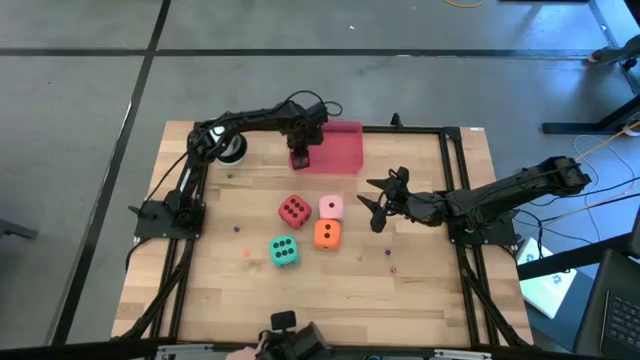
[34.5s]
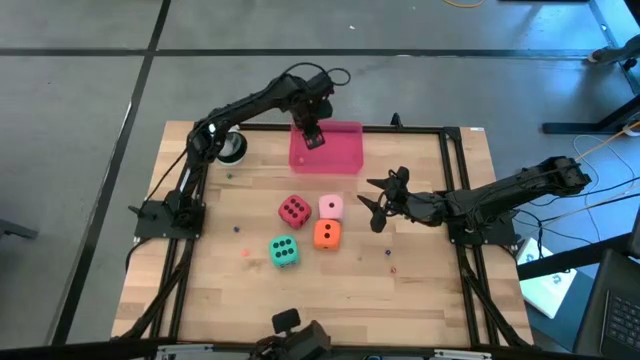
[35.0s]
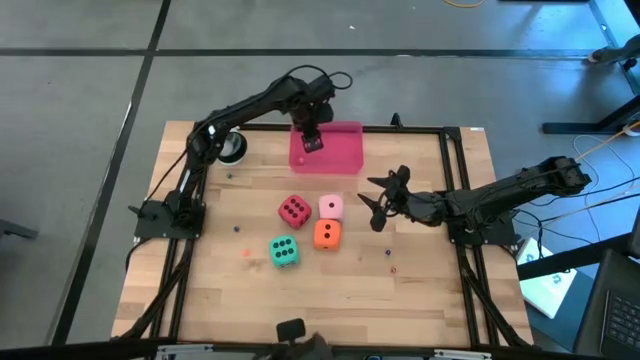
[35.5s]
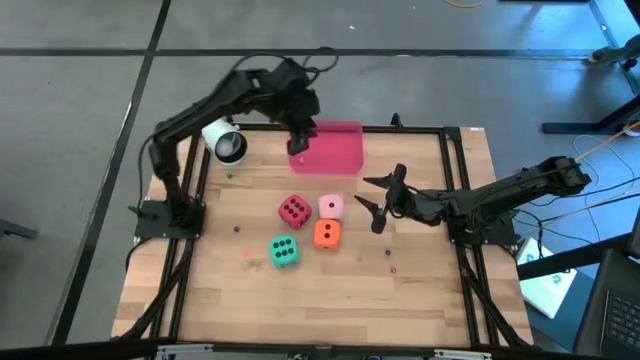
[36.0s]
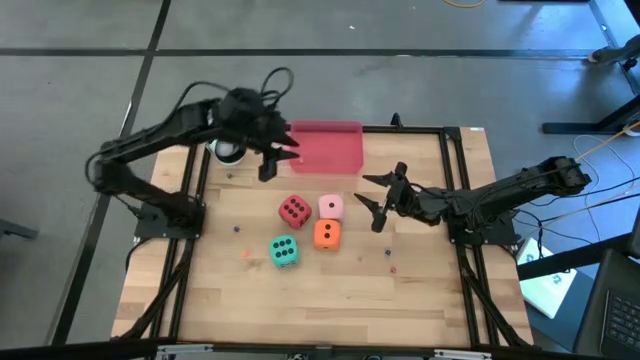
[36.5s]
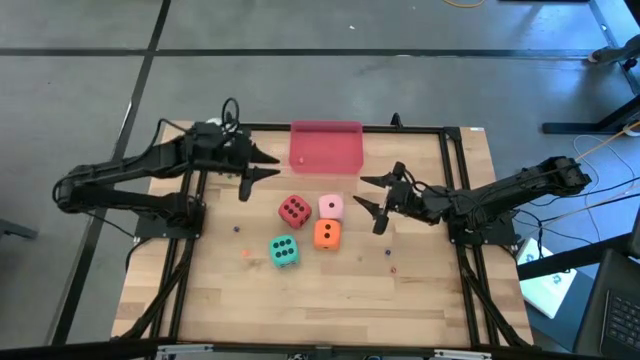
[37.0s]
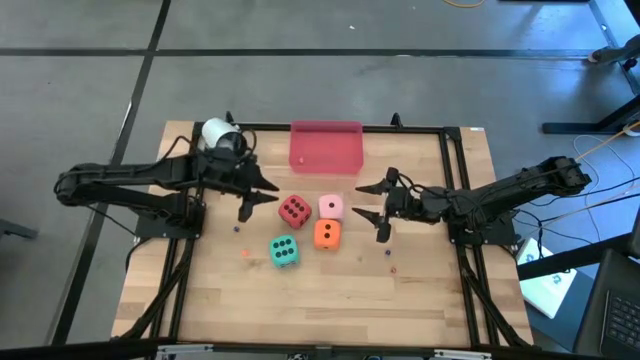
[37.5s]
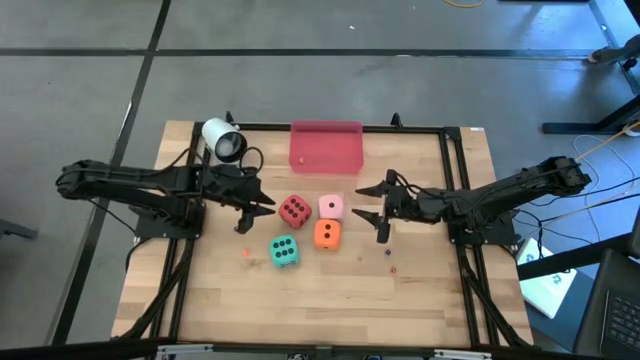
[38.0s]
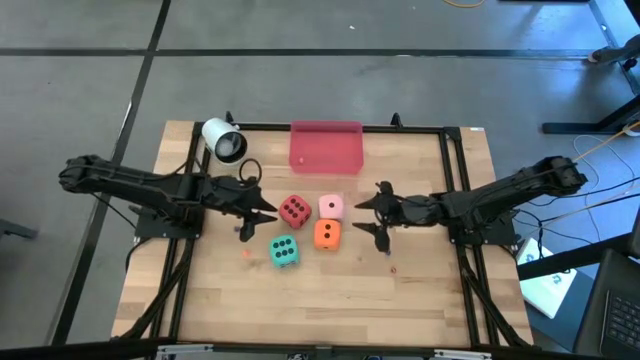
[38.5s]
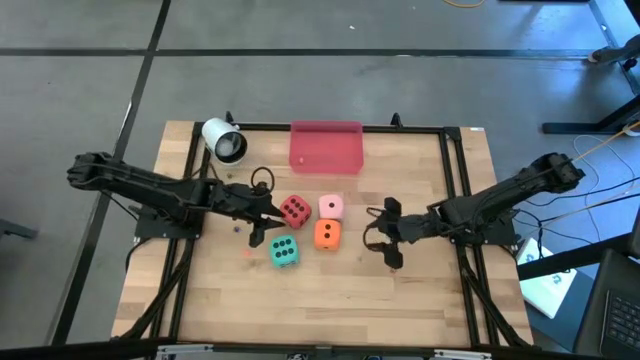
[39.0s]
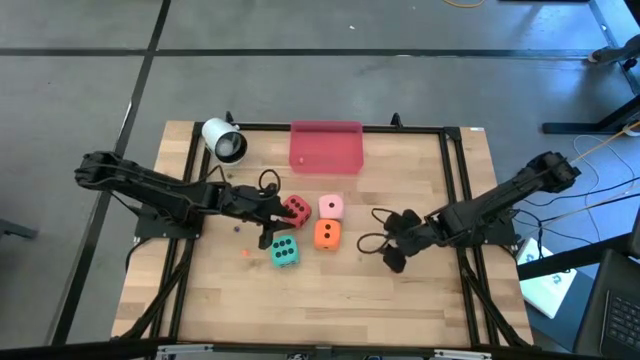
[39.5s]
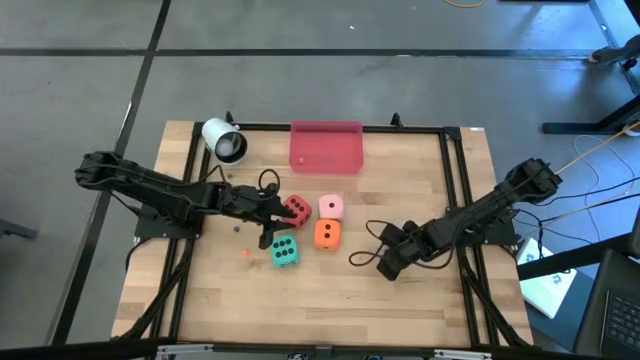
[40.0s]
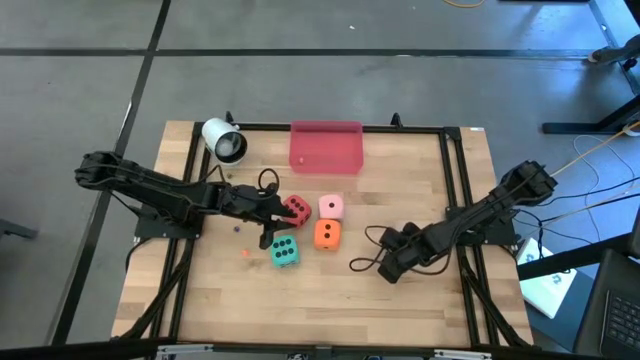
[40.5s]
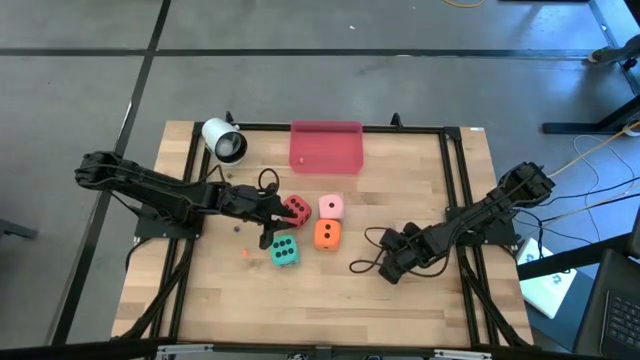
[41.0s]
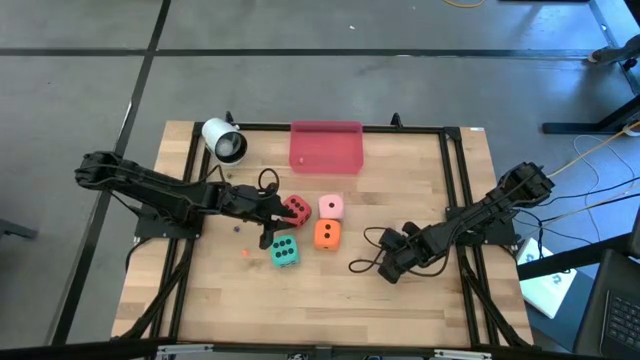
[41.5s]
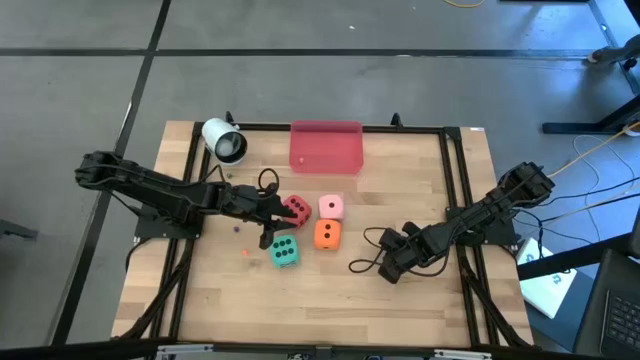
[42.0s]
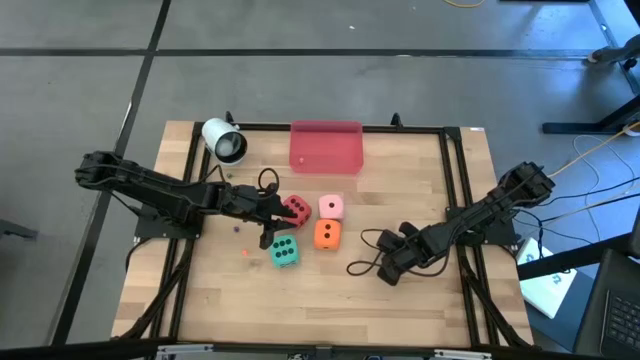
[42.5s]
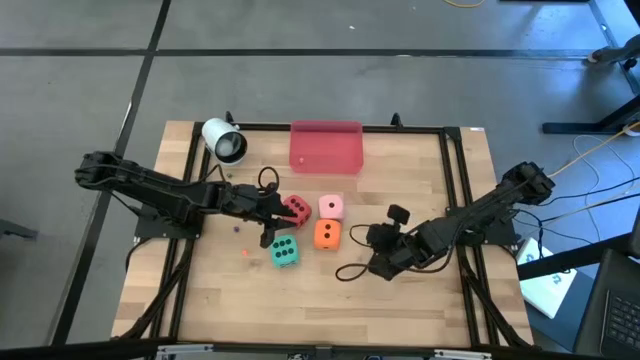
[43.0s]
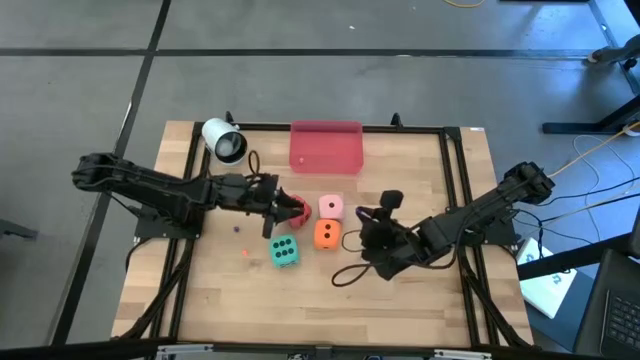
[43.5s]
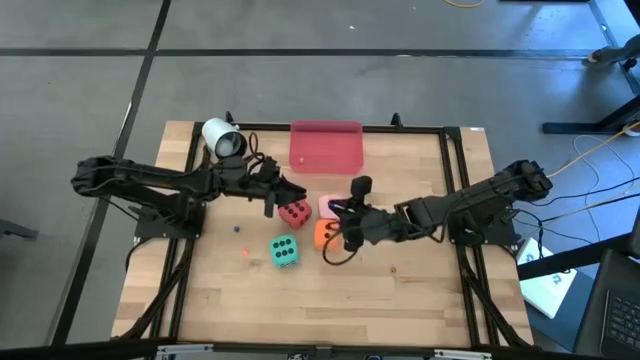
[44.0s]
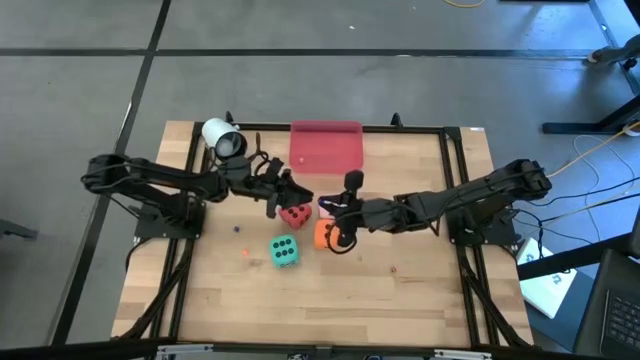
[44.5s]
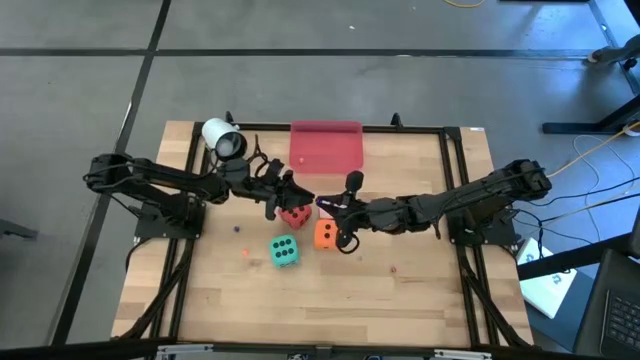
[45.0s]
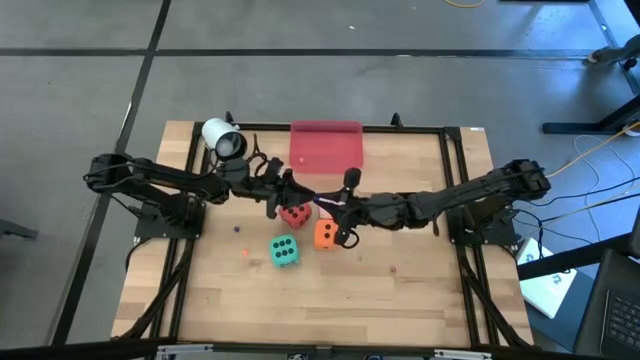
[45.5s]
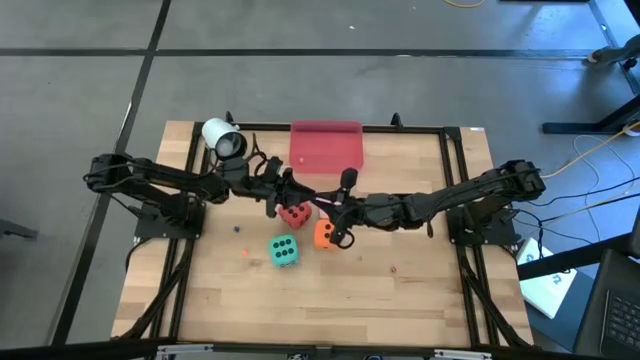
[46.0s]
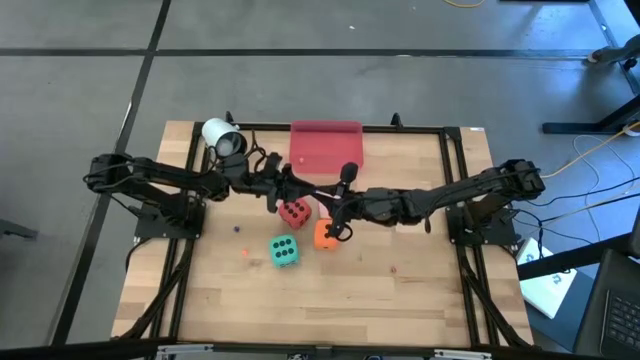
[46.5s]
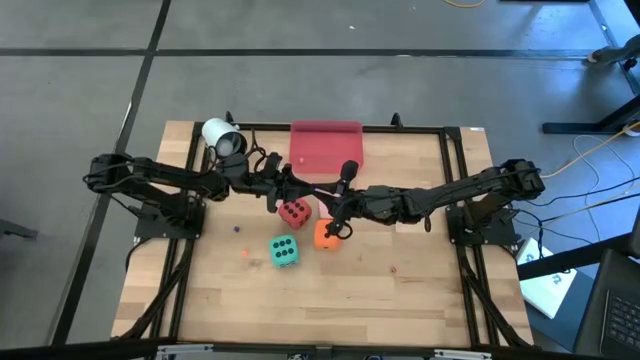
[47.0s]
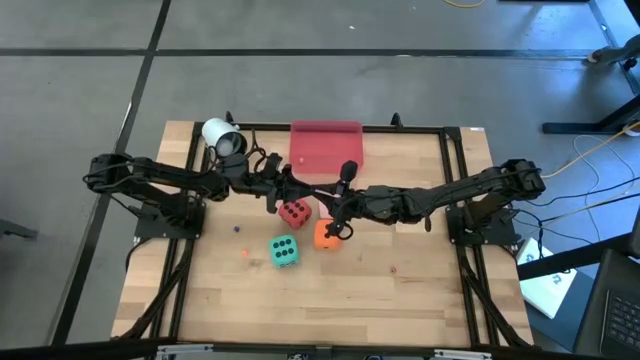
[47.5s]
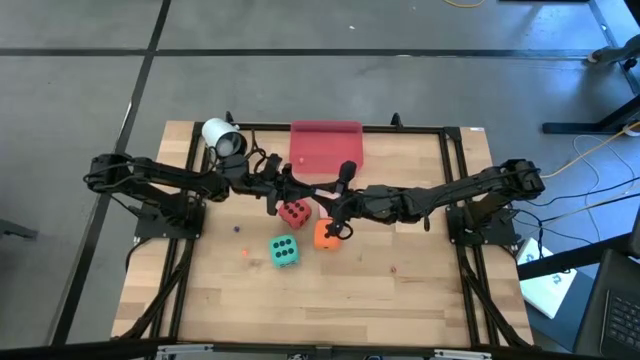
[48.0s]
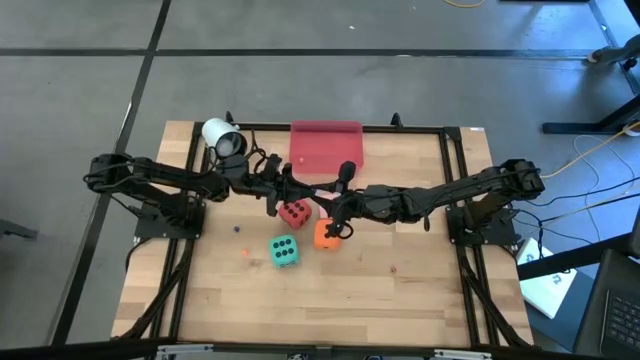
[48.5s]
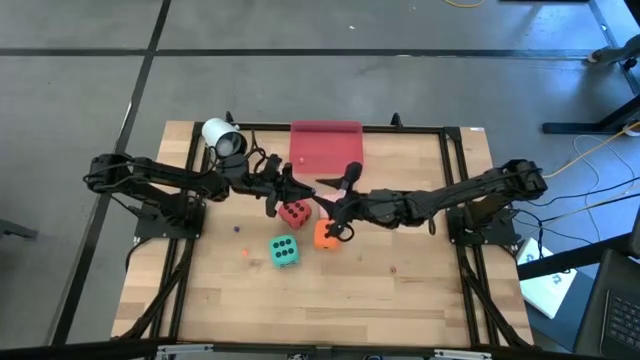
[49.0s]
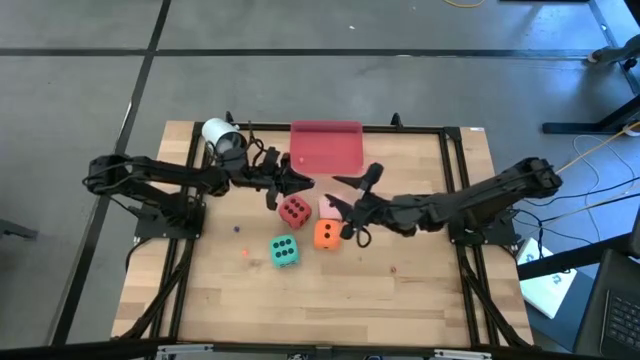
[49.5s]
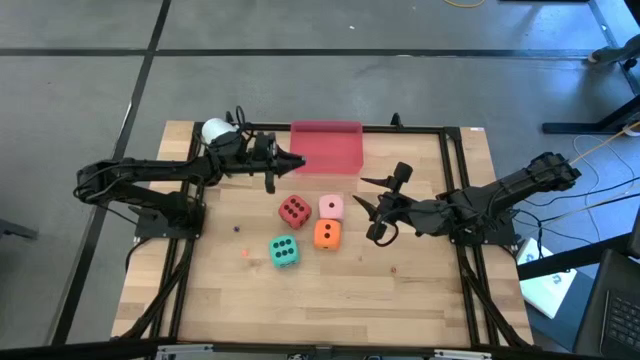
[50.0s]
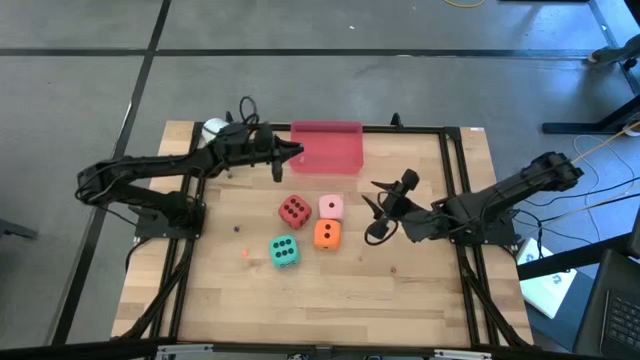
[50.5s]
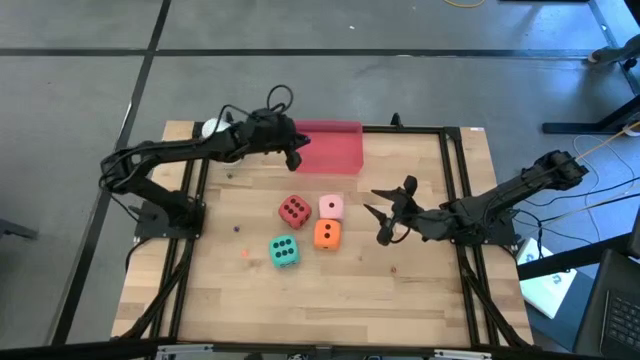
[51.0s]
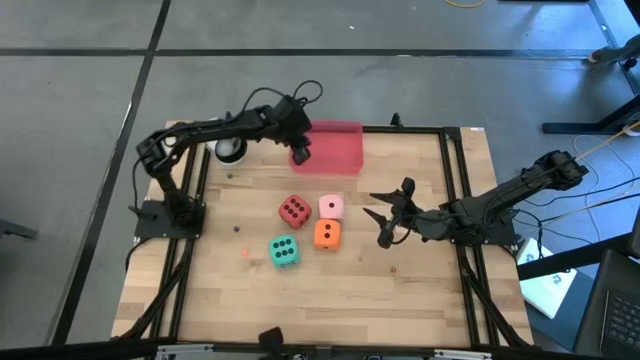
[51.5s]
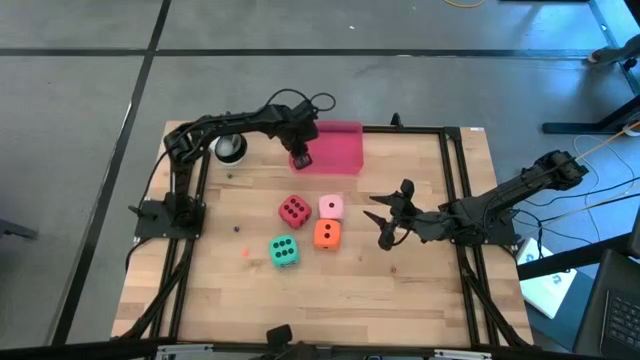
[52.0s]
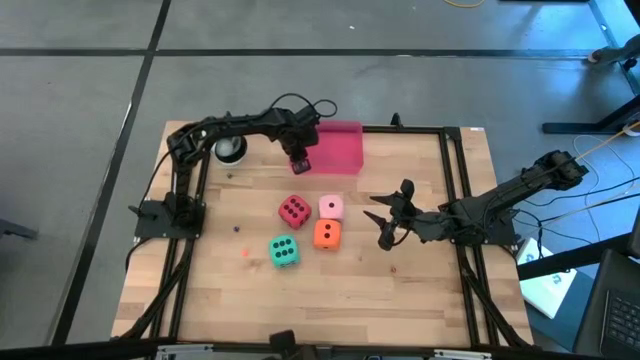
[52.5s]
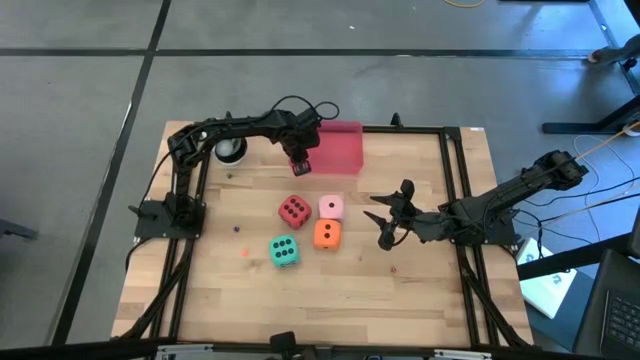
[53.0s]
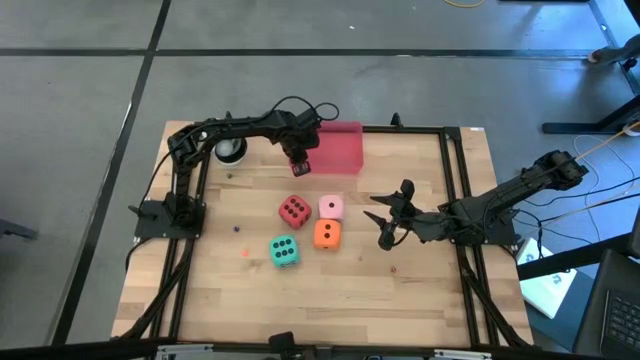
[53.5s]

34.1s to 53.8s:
Task: Pick & Place Dice
Put the right blue die into the pink bin
